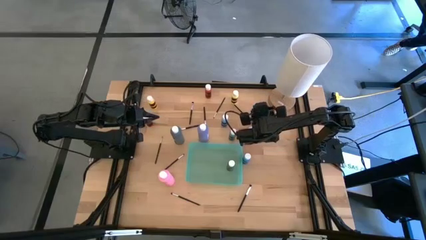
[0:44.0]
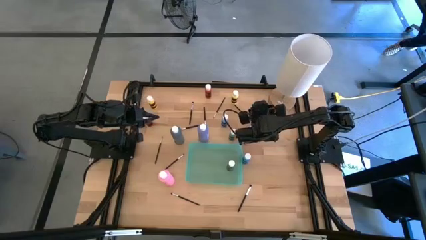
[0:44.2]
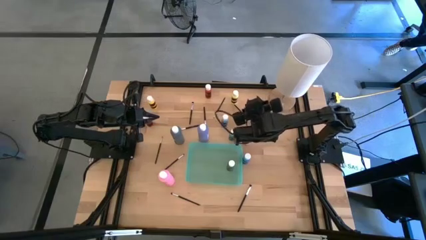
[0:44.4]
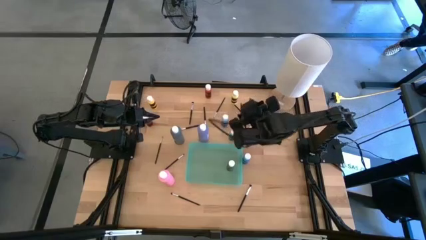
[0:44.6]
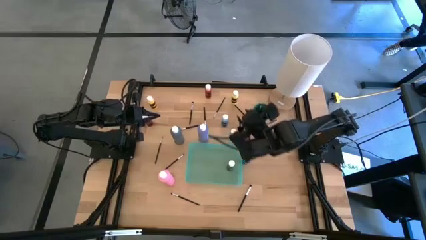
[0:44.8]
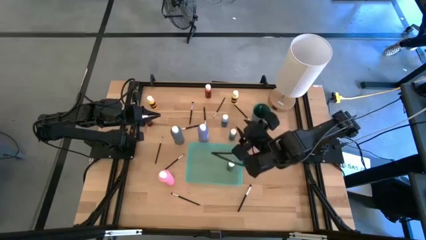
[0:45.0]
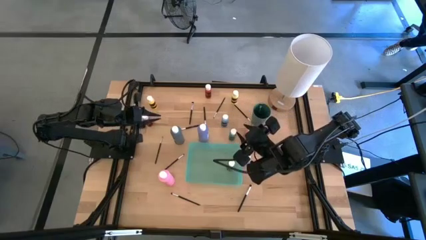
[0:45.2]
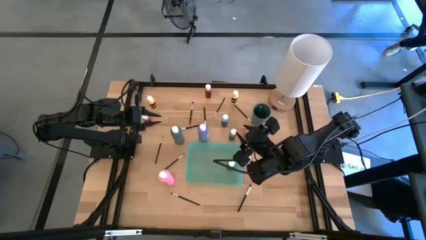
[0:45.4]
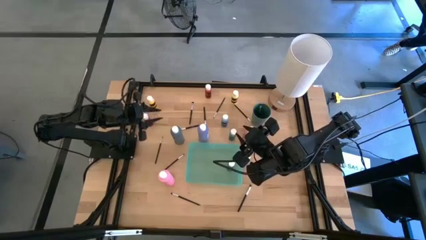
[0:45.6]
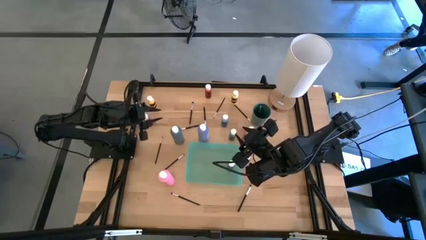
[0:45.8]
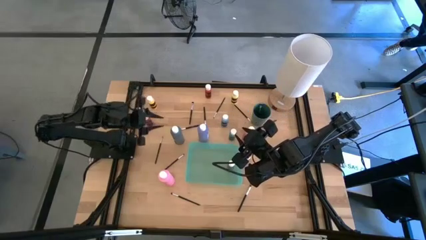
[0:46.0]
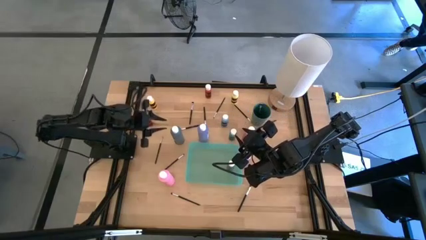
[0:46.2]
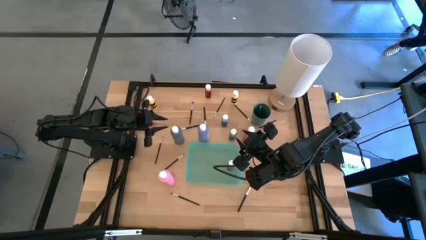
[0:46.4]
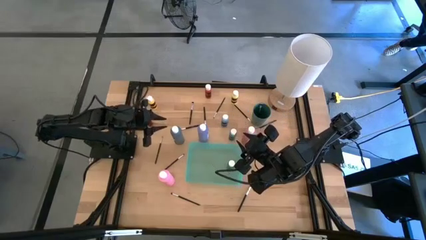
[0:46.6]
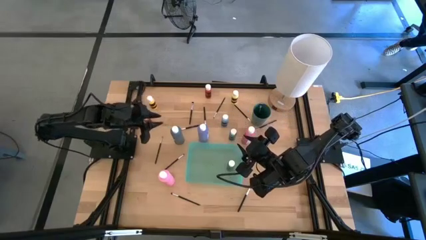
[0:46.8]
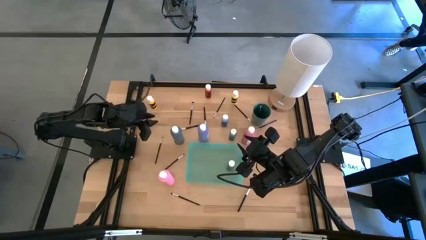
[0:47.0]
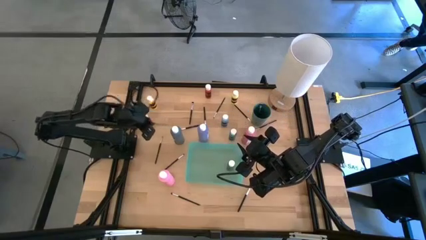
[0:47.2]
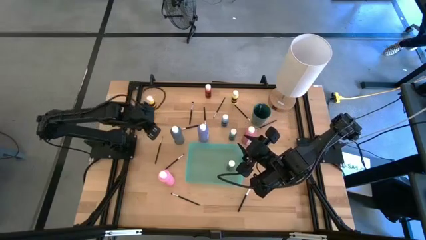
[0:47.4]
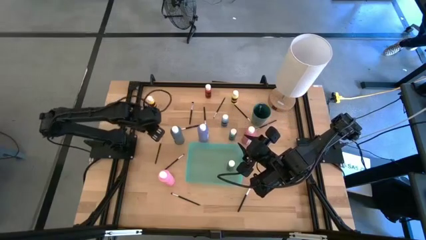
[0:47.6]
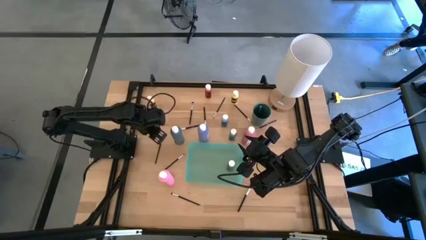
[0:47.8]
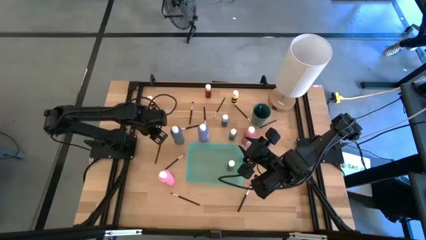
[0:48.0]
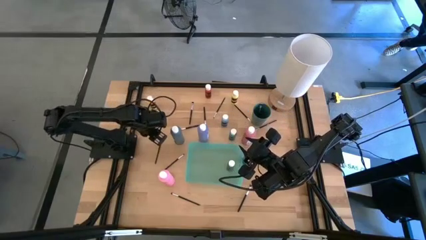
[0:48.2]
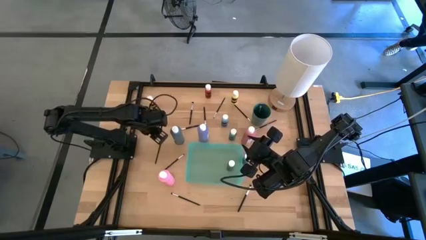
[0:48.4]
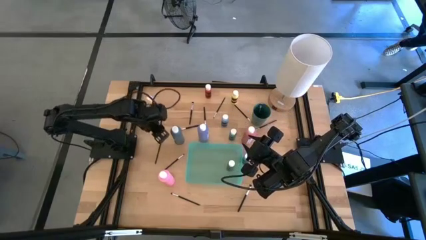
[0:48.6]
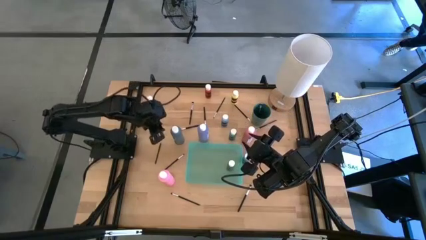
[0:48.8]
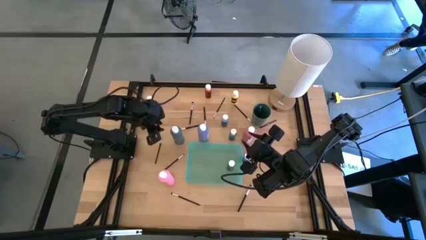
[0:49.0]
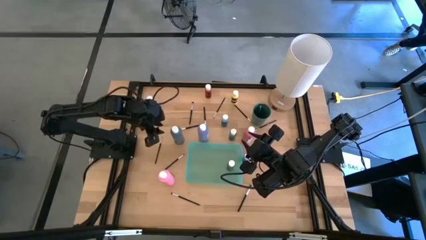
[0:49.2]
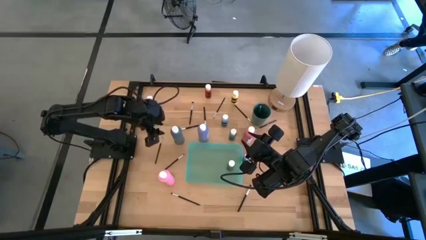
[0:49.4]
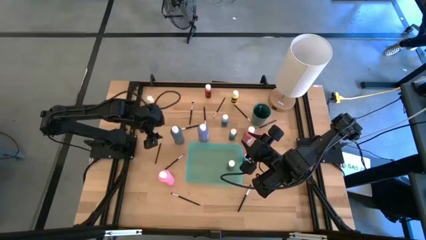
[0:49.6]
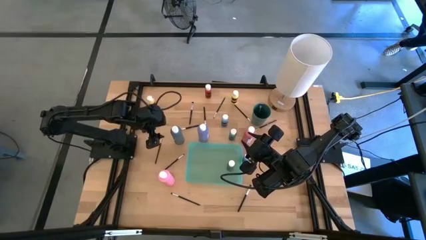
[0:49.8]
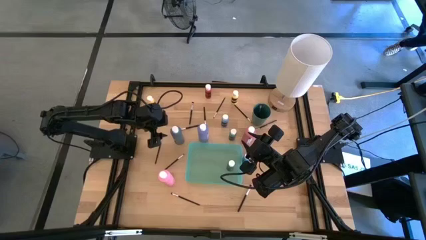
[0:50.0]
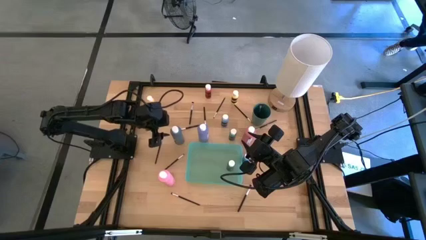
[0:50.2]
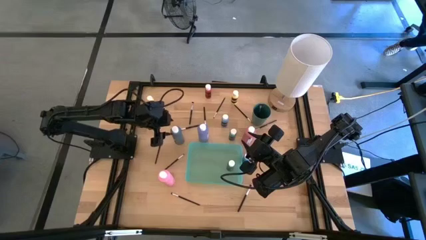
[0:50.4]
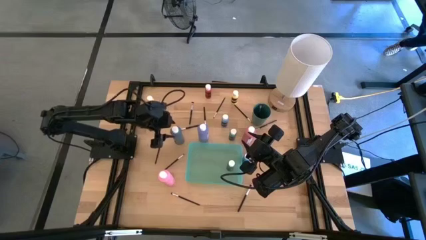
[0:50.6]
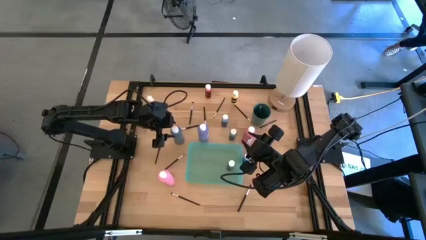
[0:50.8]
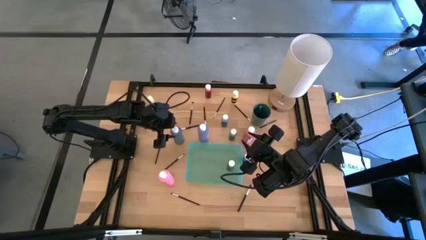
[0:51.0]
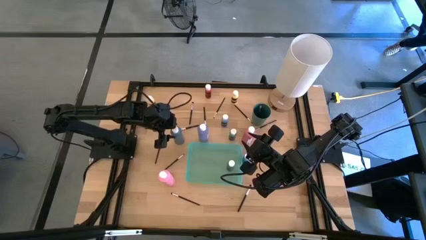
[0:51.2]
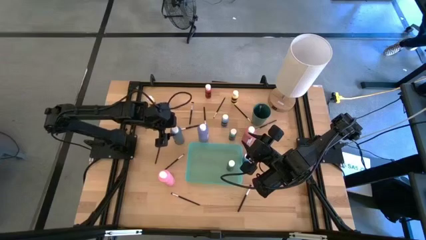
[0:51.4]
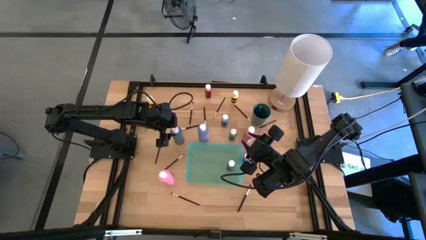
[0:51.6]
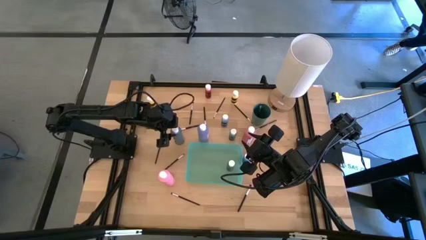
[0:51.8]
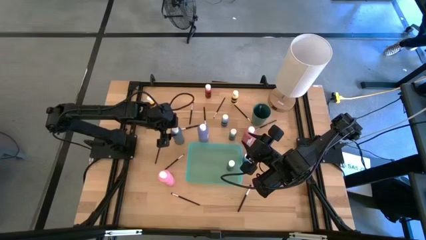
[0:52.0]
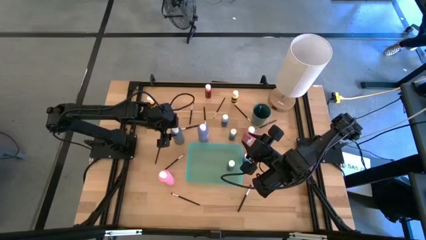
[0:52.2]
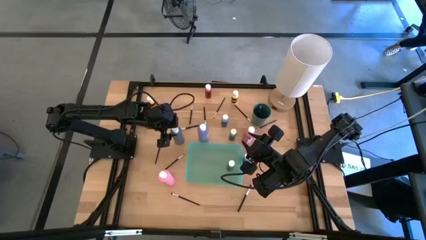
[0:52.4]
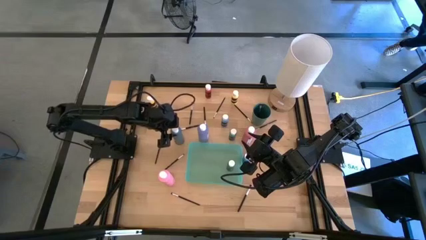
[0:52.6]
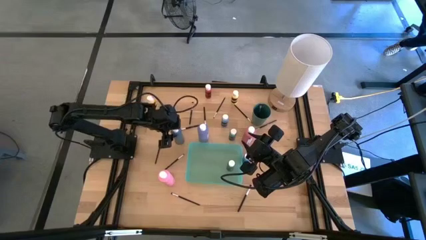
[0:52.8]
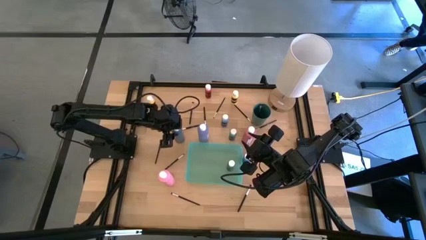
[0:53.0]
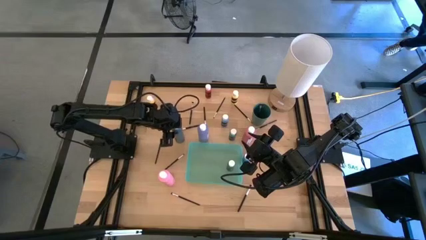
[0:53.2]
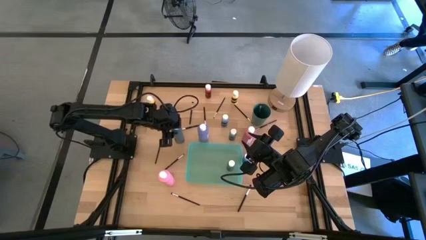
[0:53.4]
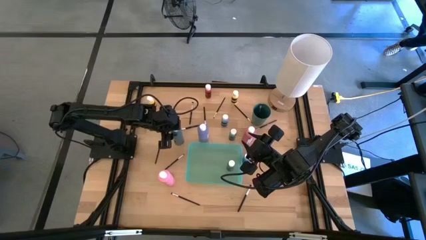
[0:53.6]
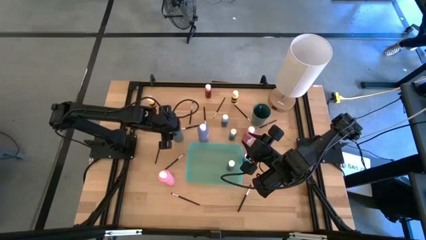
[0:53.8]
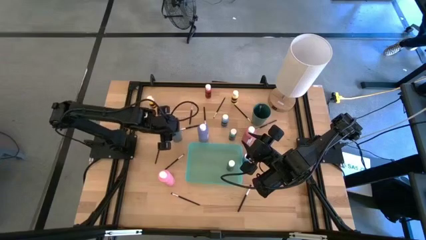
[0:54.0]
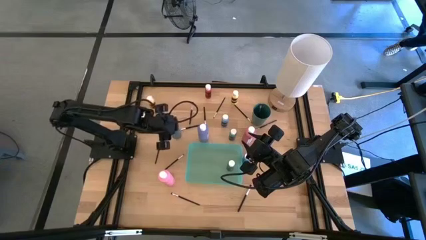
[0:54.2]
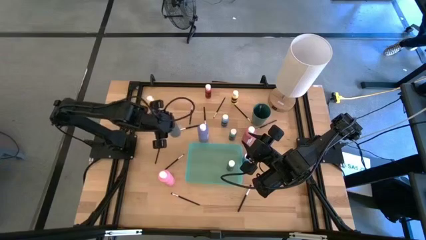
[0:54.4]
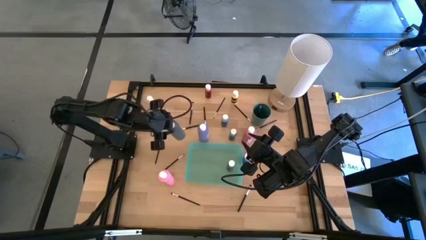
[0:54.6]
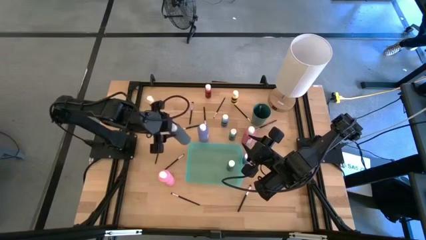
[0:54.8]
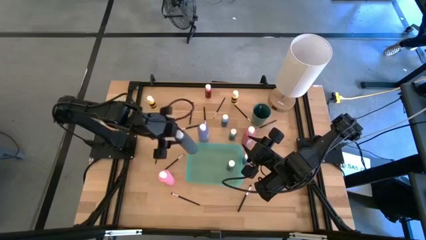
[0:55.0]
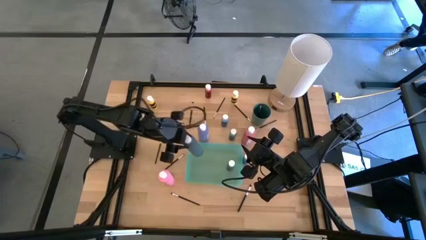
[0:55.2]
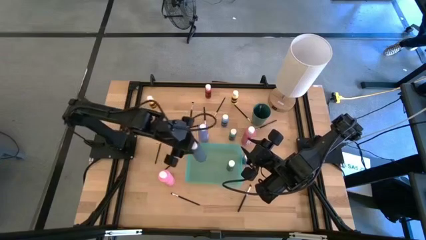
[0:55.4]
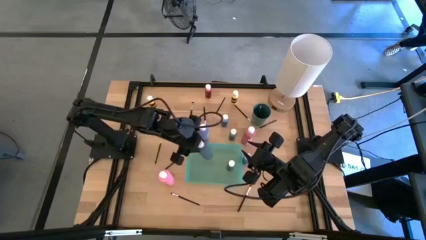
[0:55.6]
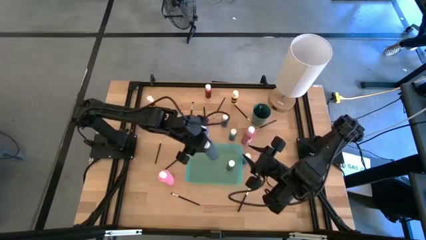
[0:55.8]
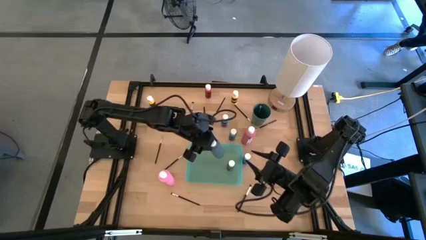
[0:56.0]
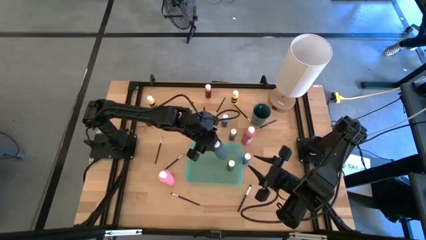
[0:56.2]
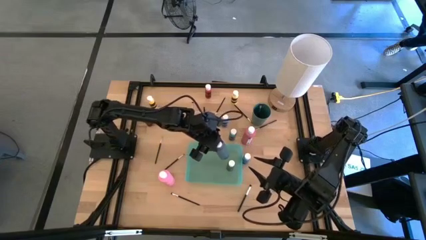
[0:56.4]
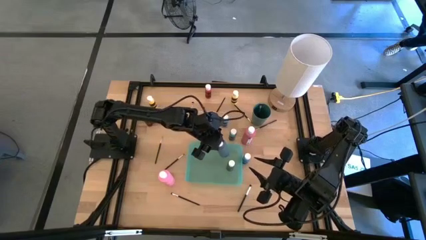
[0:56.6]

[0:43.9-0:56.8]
Task: Pick & Place Paint Supplies
Put the big blue paint bottle into the light green bin
